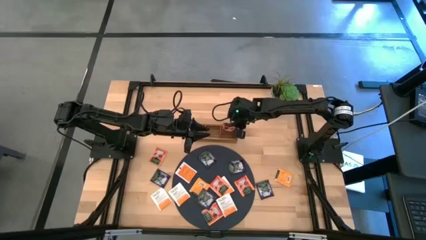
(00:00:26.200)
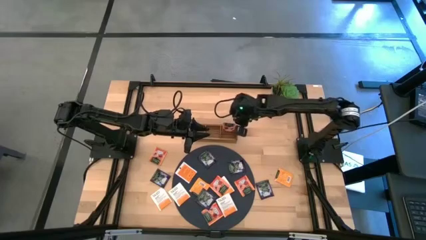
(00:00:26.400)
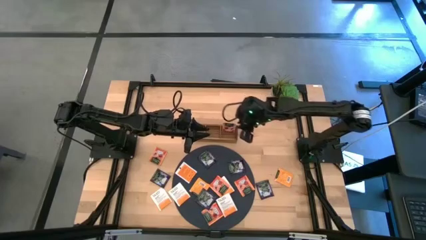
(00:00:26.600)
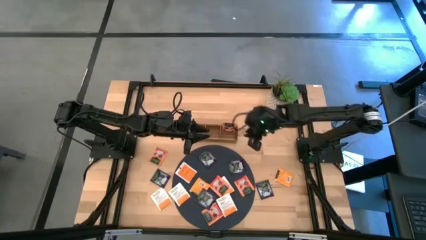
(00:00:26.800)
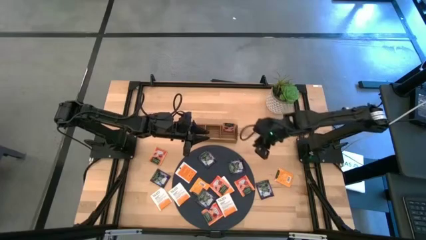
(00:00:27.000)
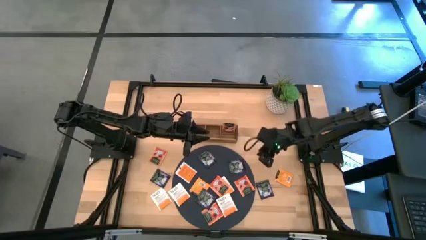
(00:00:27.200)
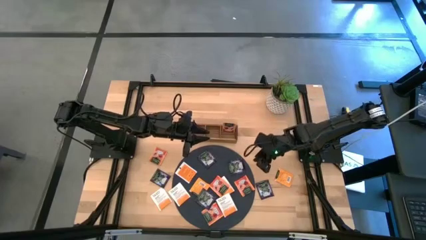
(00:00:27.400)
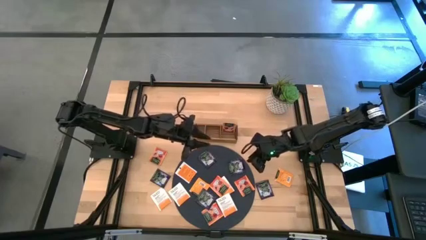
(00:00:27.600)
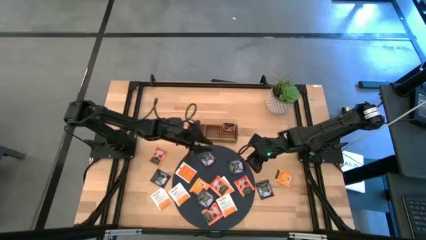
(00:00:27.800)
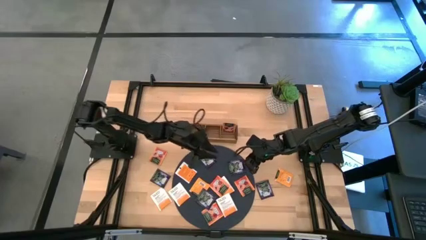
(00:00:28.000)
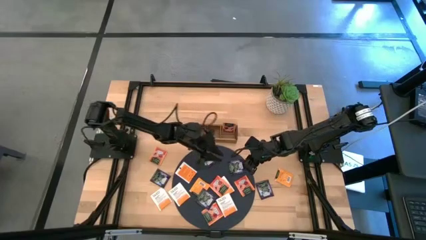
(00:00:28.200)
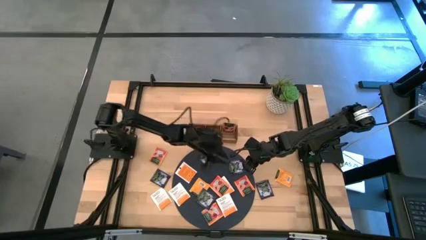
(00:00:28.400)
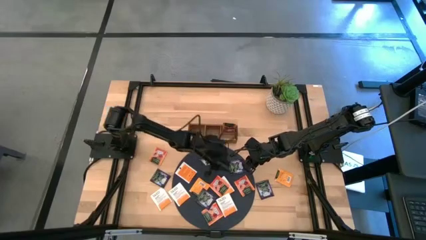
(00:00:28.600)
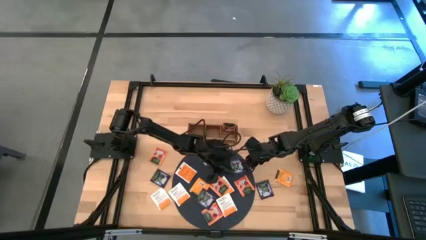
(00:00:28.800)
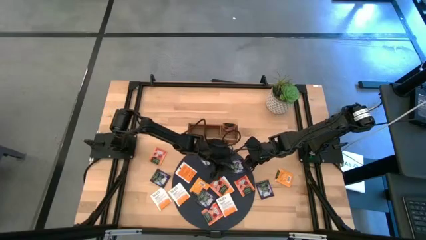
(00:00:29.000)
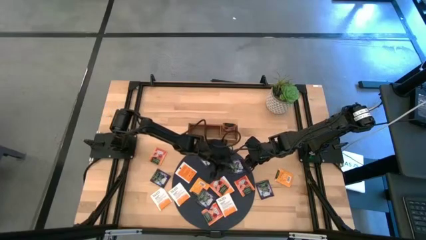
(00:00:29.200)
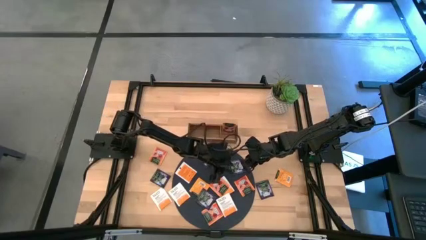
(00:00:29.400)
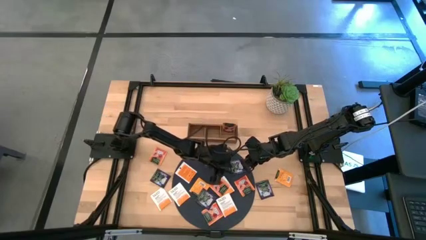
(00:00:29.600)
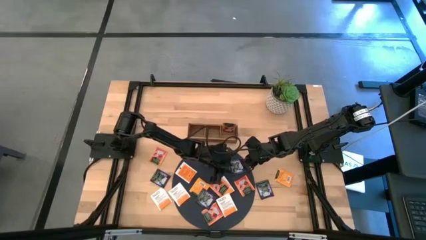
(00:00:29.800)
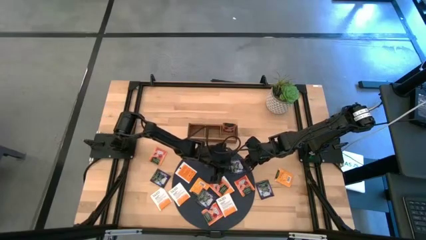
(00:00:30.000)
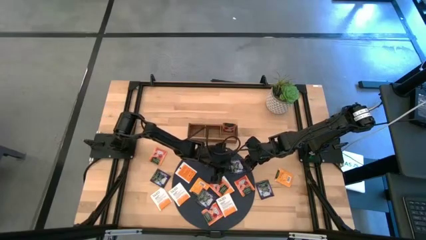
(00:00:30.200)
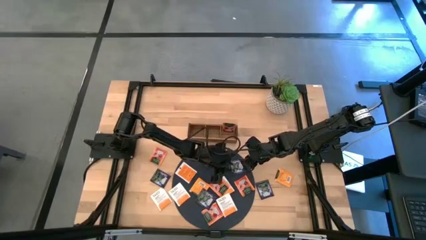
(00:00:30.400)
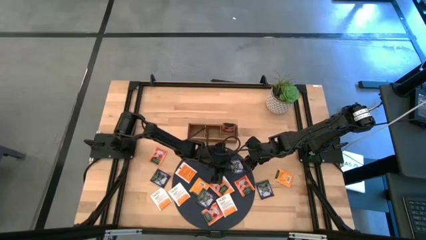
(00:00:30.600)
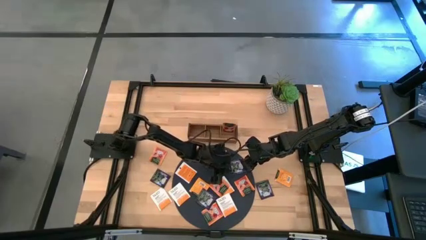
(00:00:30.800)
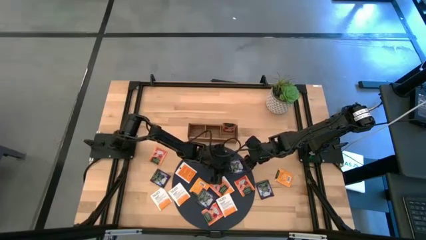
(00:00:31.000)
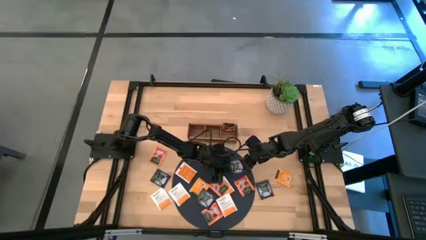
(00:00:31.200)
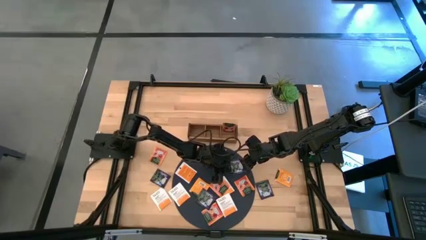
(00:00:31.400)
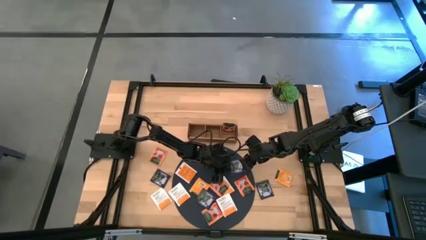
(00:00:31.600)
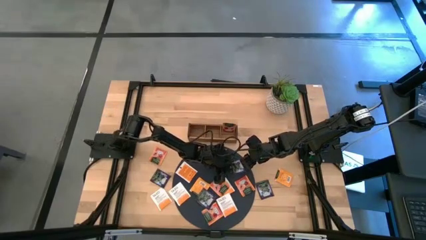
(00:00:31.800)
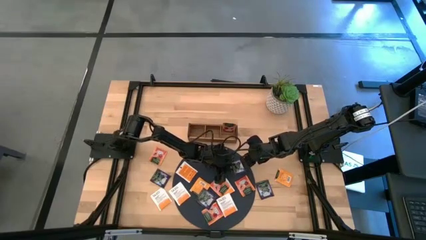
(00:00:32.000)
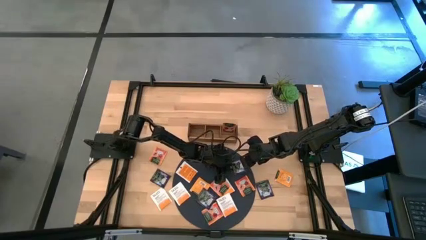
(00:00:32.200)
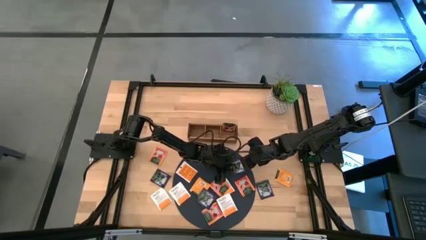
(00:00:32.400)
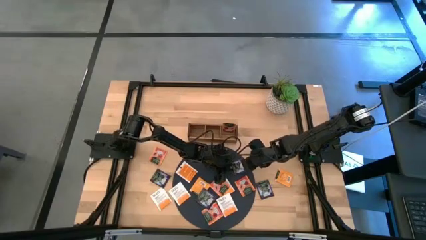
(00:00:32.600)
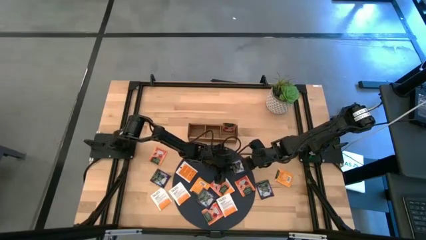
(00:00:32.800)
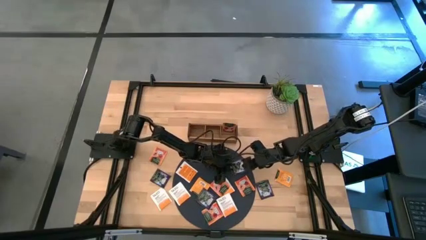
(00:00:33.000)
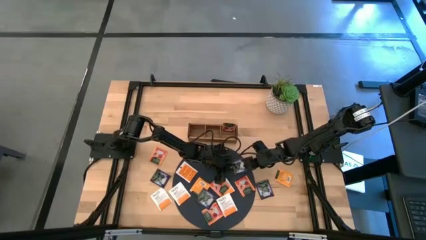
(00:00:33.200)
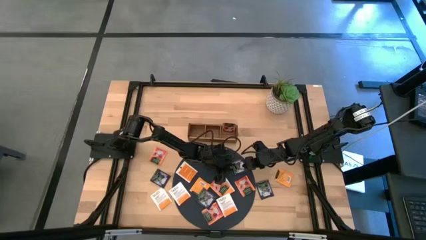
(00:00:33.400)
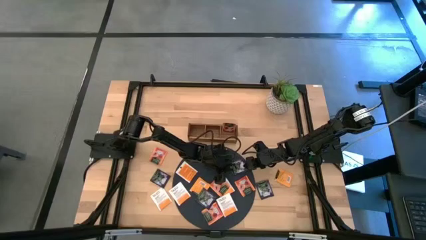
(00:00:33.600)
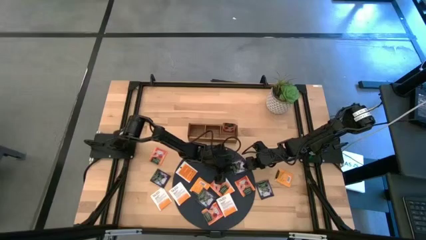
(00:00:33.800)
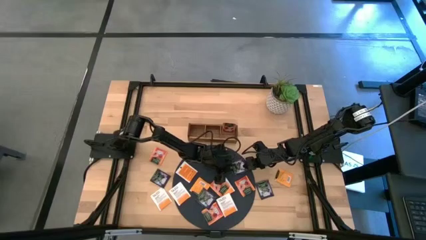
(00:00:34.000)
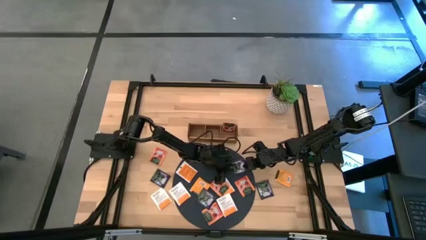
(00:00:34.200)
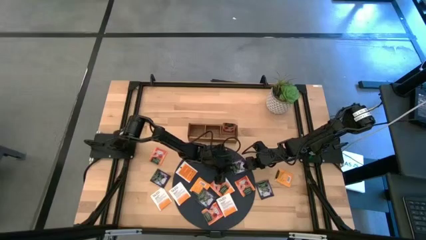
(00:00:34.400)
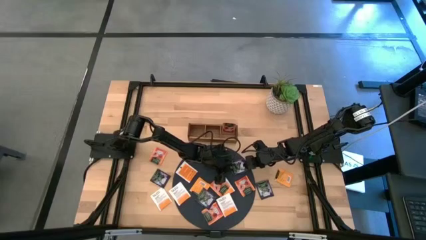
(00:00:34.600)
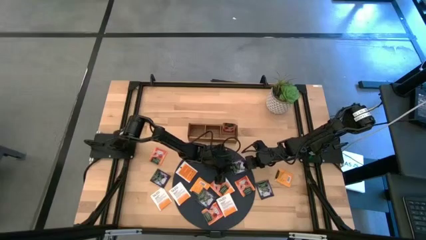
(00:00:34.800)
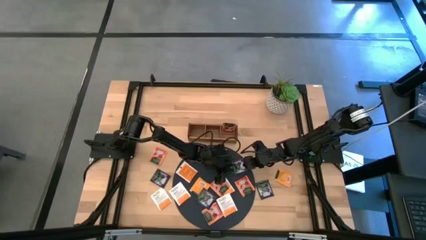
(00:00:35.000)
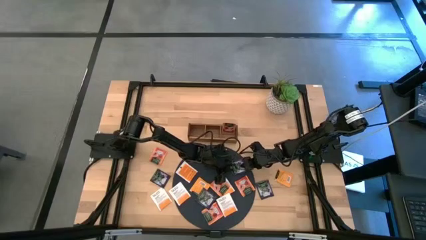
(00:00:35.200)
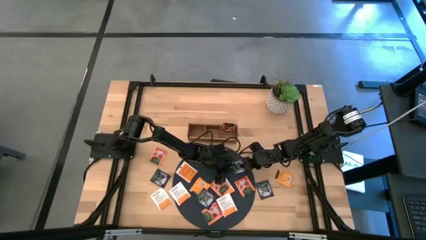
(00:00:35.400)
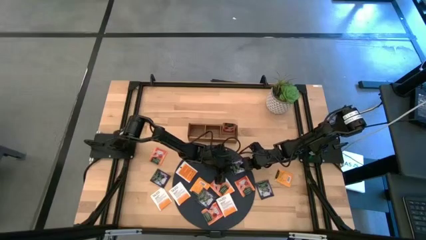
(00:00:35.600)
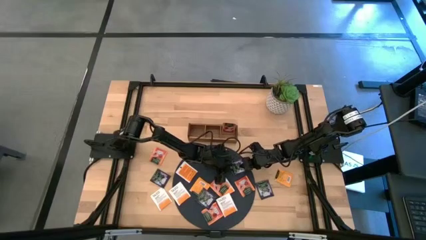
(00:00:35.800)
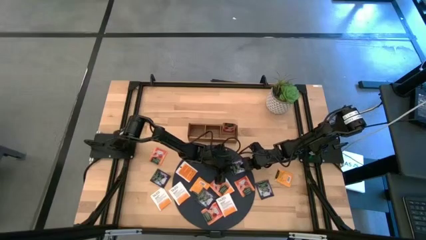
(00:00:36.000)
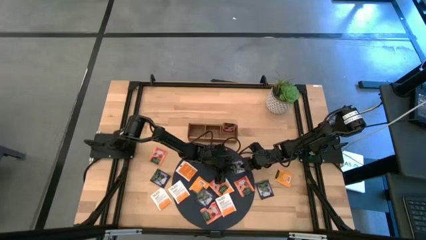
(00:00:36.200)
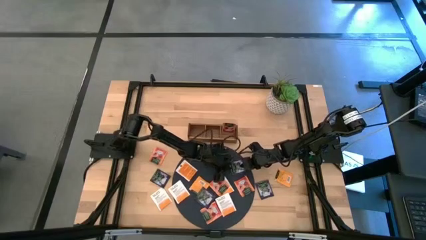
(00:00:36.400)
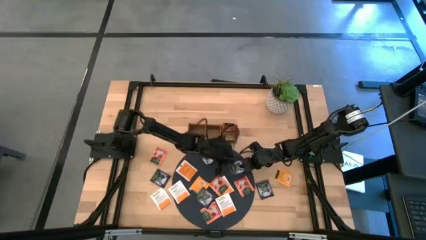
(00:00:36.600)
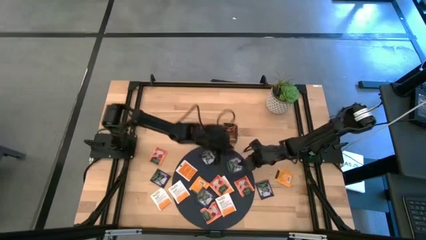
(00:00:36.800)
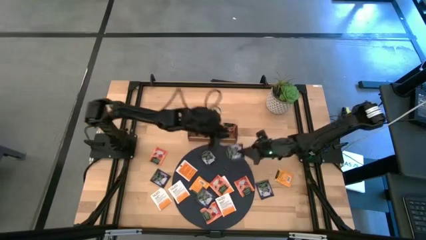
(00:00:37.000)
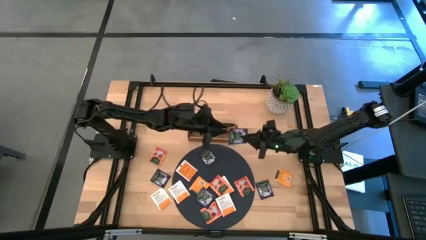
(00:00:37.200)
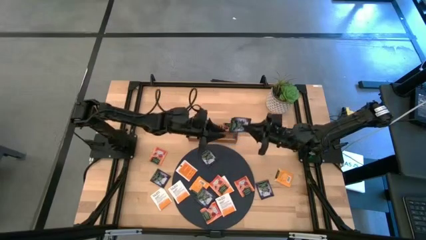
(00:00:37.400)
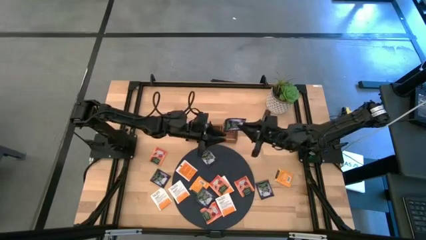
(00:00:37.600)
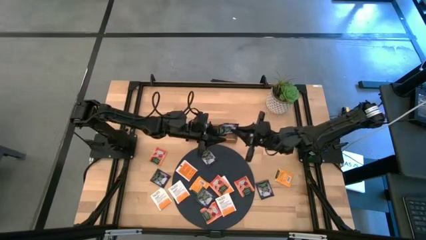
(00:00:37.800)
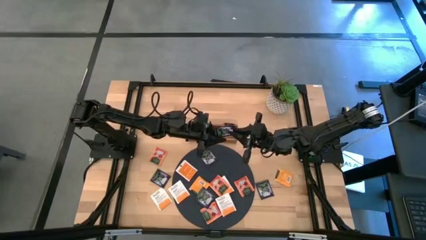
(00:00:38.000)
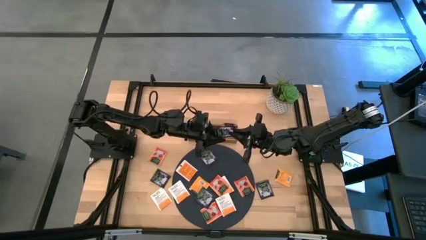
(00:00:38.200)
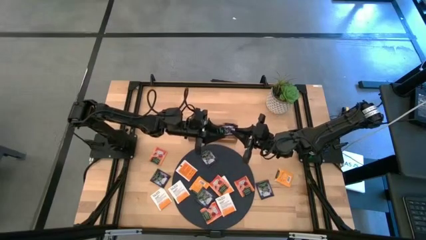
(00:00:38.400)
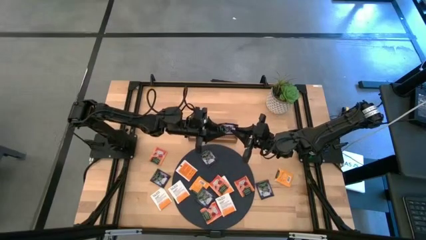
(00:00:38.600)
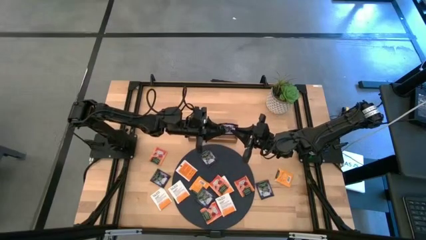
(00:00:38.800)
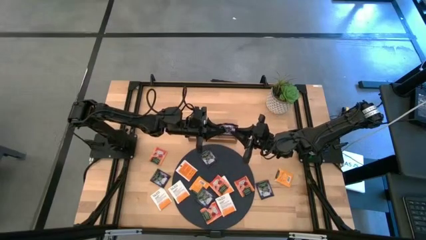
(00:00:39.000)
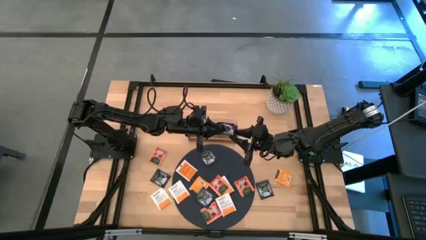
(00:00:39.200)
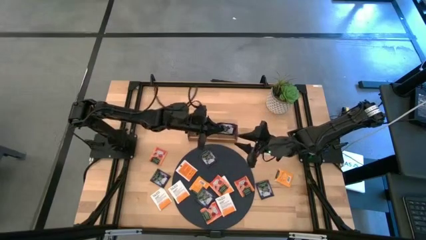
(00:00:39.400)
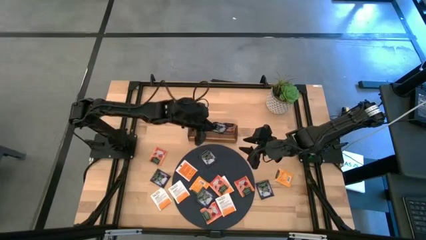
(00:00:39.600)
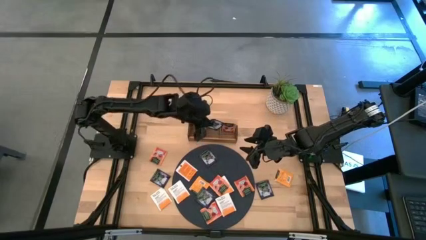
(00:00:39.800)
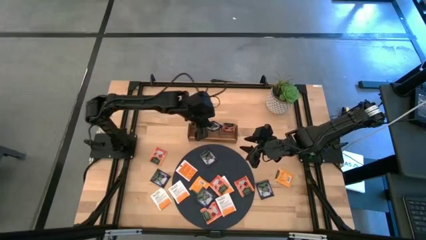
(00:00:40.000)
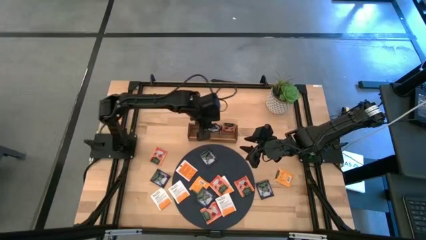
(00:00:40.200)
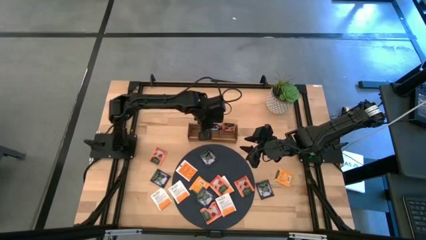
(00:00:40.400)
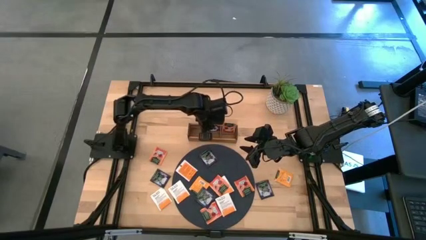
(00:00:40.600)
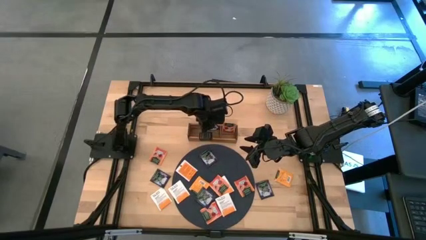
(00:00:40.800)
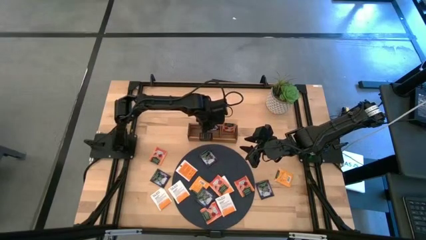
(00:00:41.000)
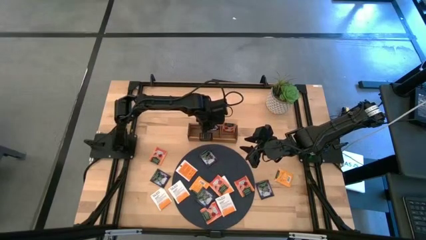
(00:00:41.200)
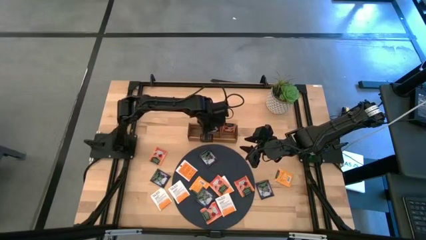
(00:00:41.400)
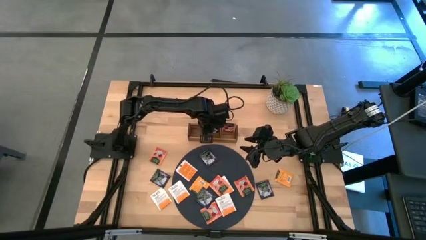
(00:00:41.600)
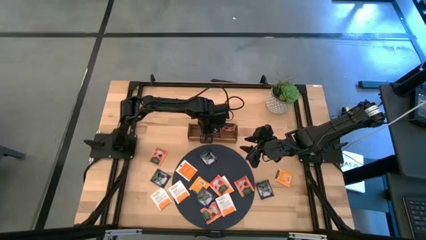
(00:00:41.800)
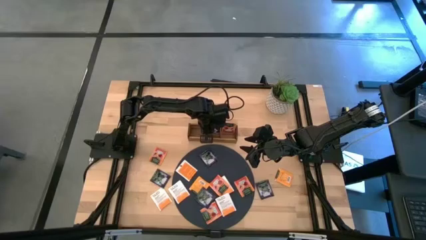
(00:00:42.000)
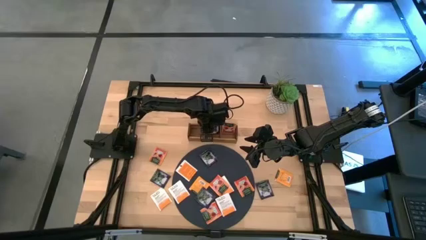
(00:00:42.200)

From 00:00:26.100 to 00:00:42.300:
Task: Pick & Place Tea
Put the violet tea bag into the middle of the wooden organizer
